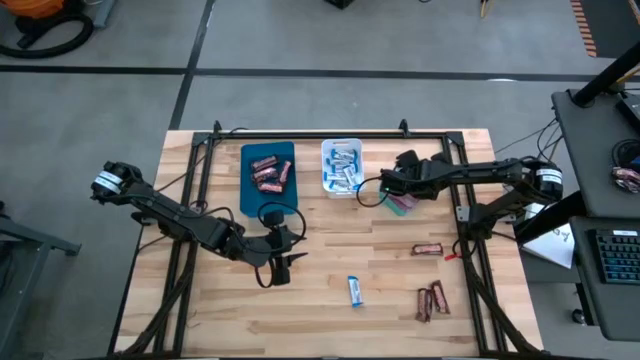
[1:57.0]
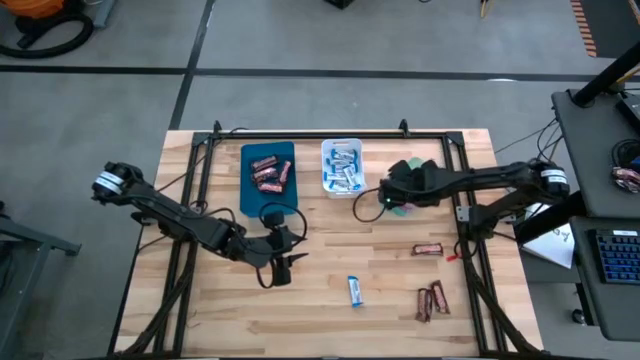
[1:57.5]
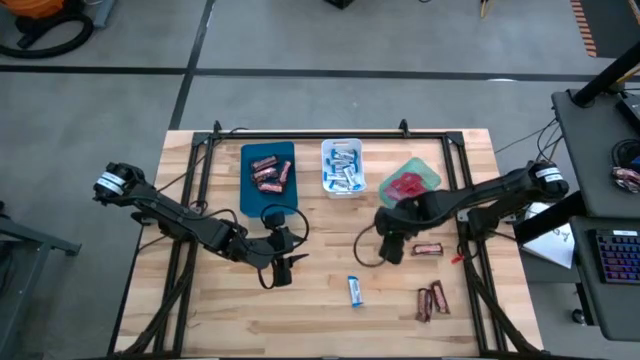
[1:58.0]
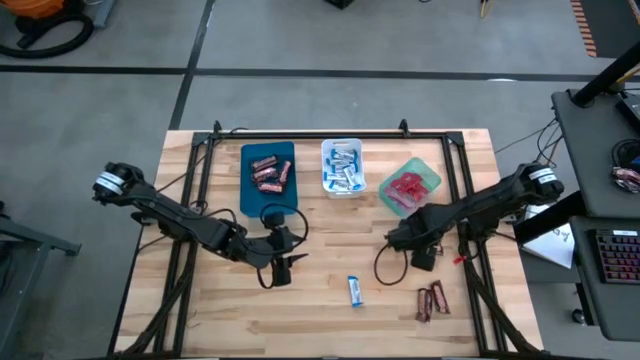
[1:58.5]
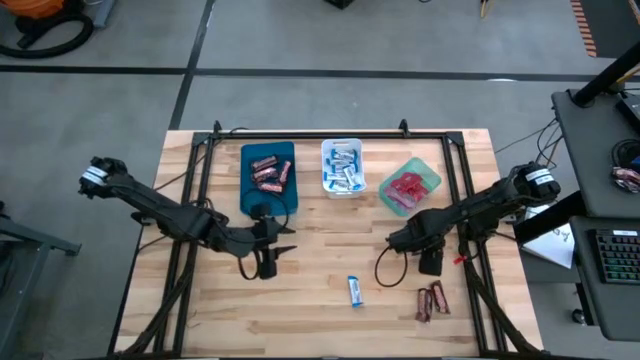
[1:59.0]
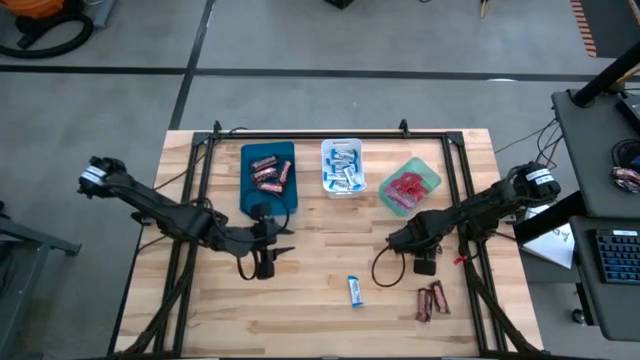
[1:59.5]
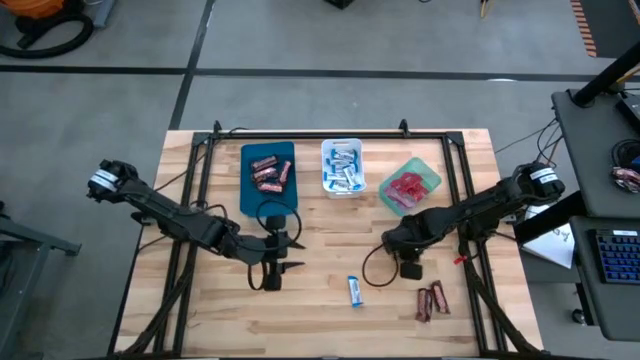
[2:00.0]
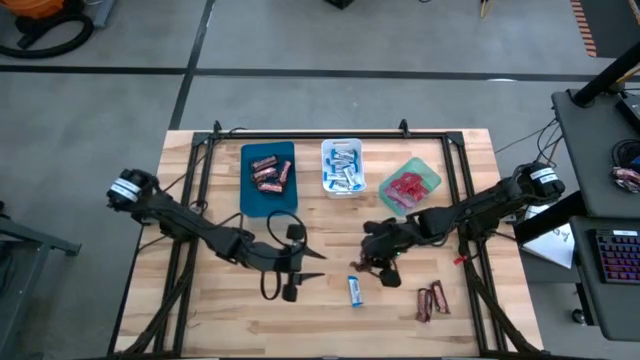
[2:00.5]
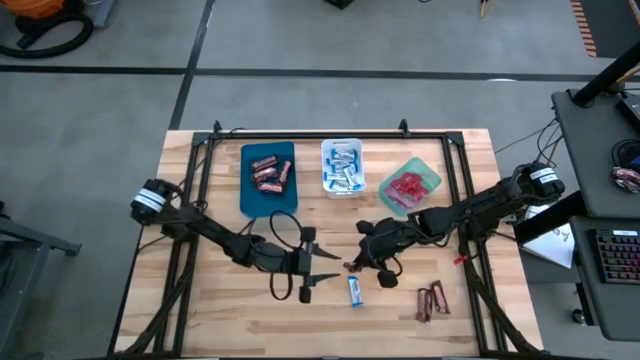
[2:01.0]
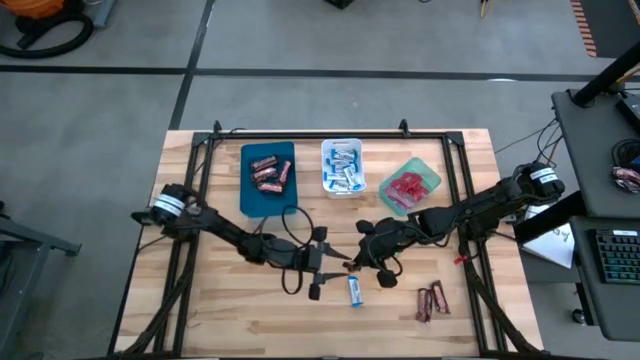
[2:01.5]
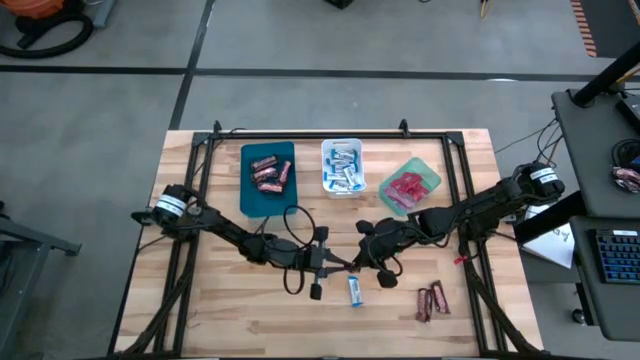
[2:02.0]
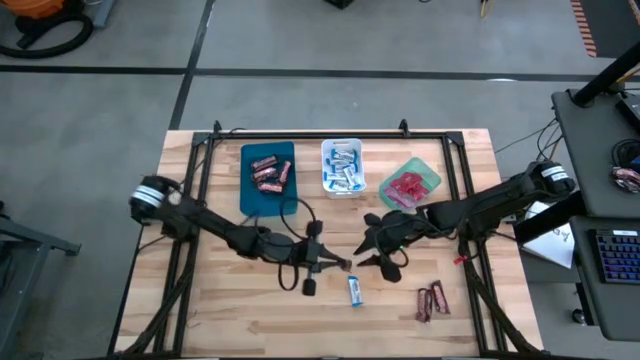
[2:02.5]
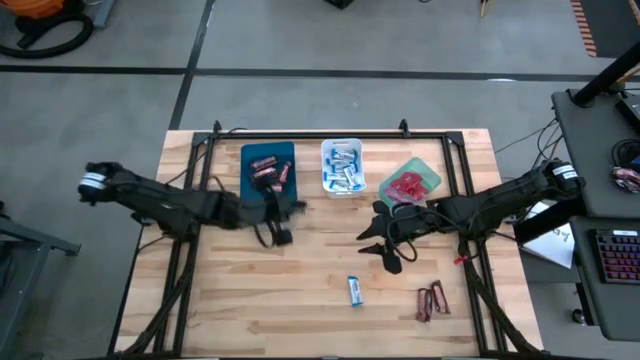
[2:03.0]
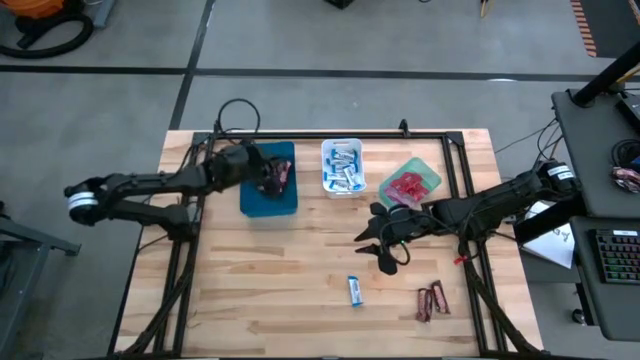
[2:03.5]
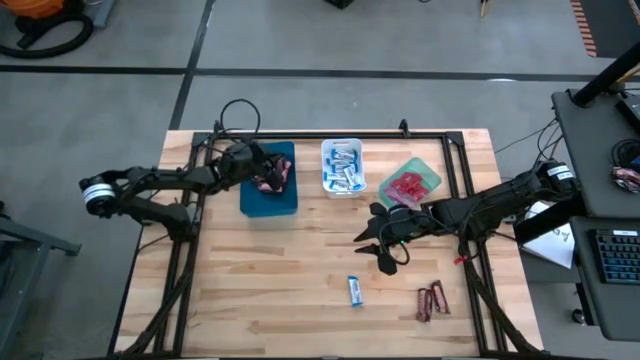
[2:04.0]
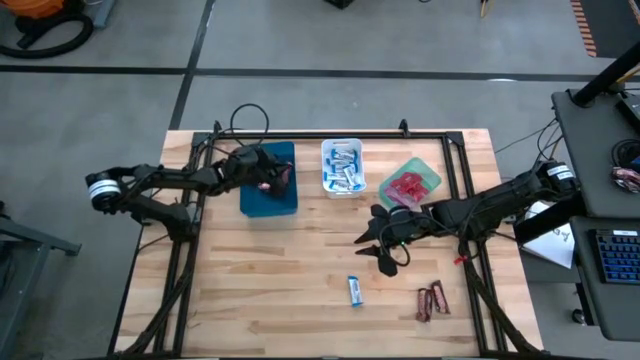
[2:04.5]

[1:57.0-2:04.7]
Task: Sort candy
Put the brown chocolate into the blue bin

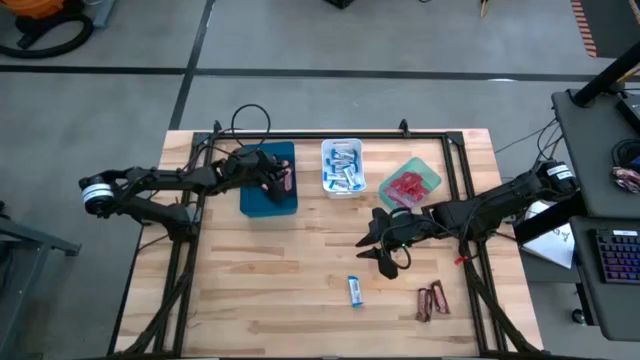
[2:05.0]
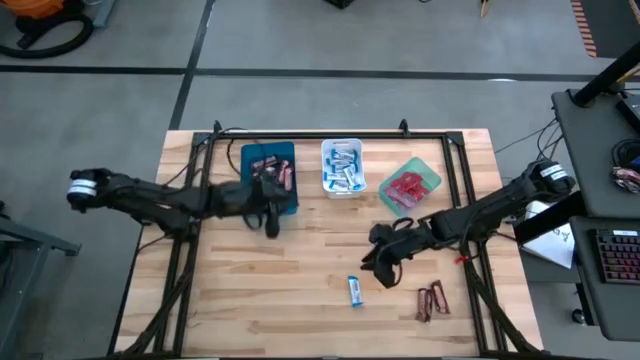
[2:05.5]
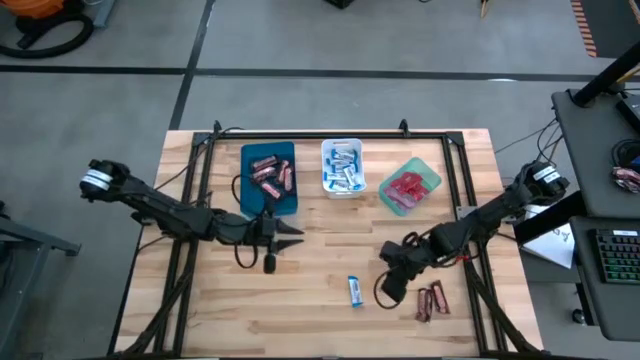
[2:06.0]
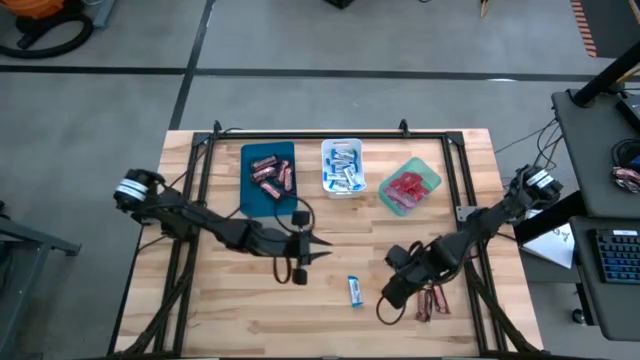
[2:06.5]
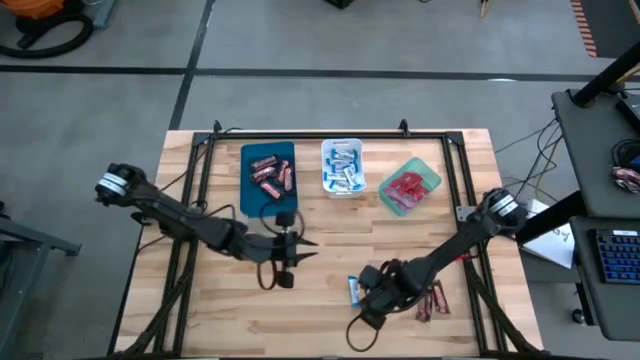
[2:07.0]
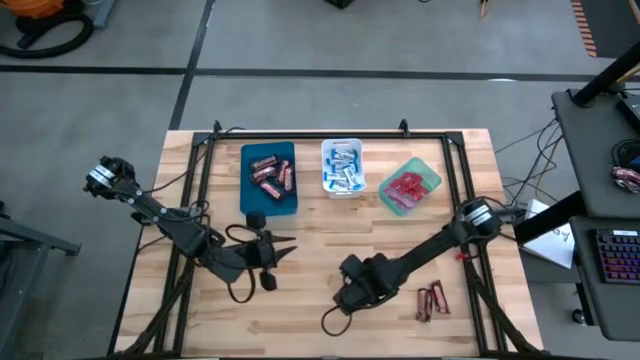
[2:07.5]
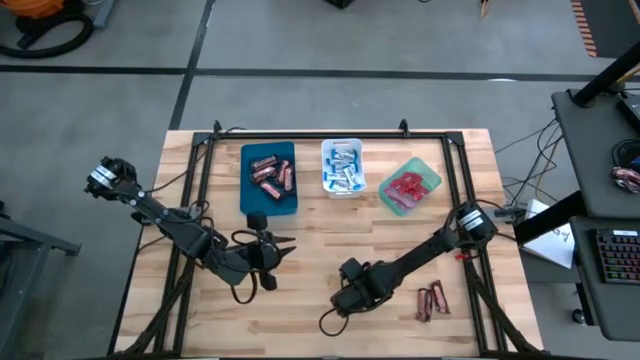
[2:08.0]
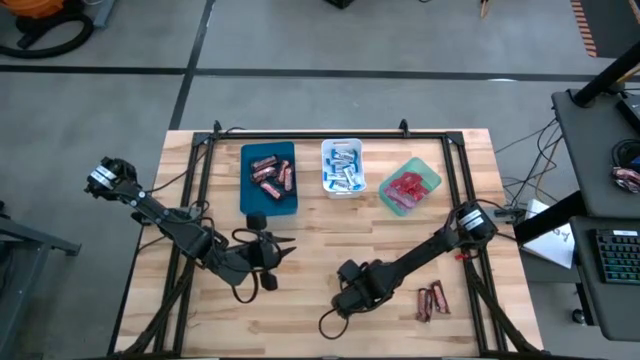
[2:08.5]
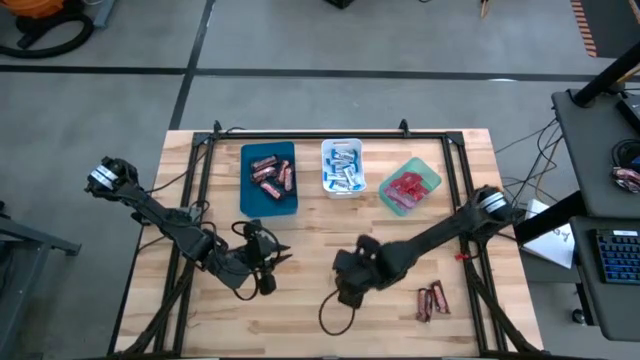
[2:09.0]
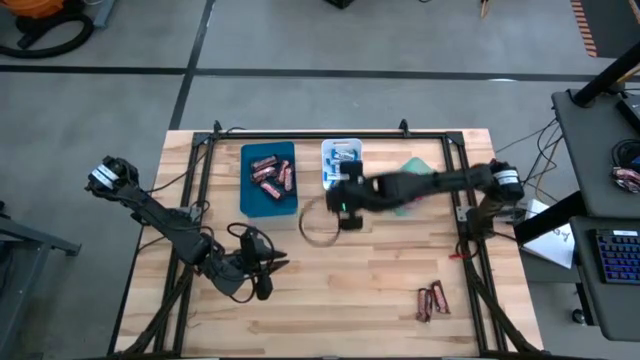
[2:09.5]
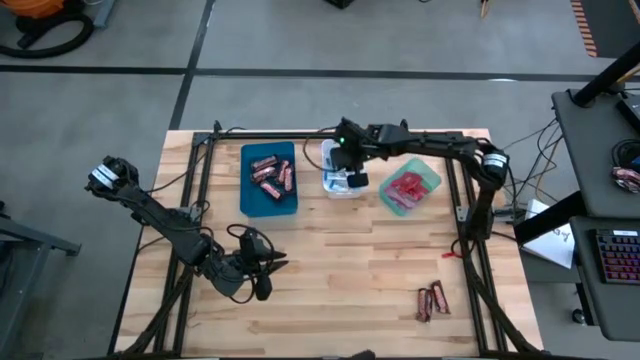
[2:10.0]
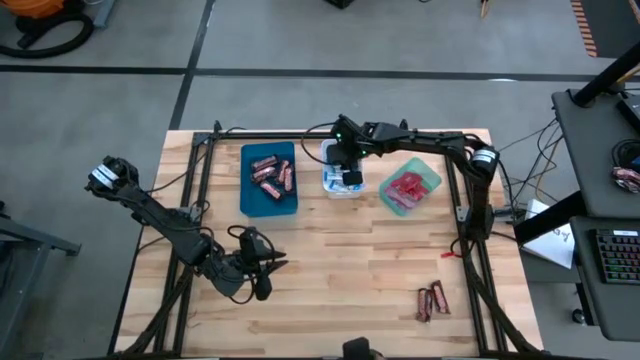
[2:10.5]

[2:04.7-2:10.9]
Put the brown chocolate into the blue bin

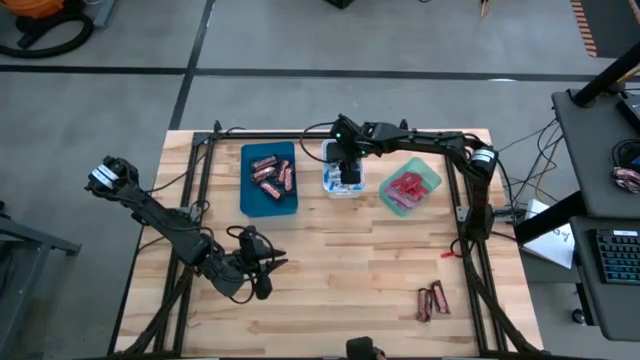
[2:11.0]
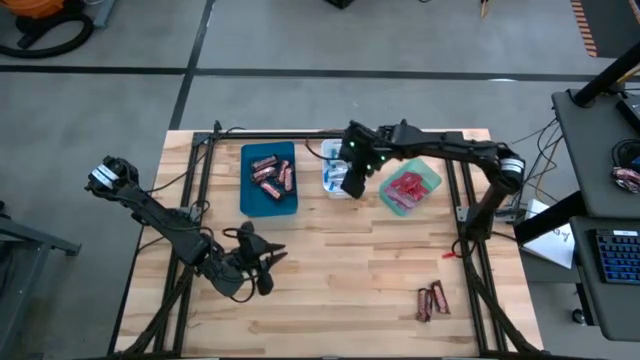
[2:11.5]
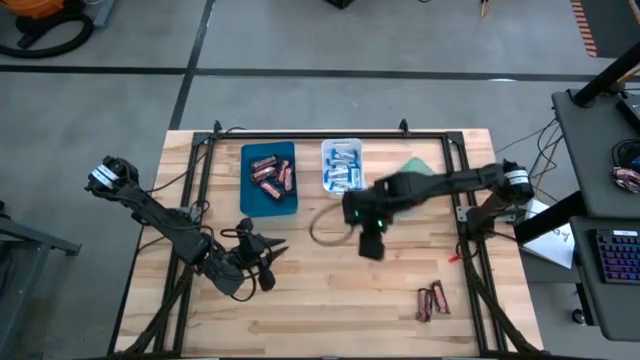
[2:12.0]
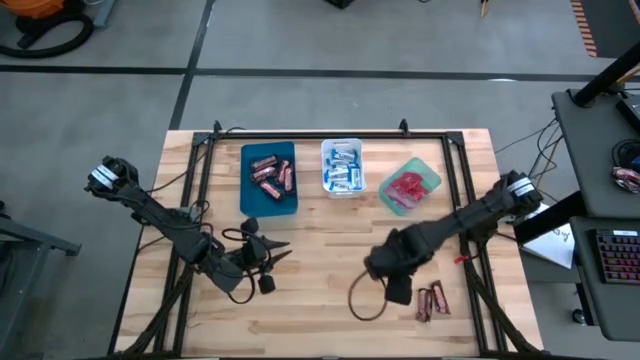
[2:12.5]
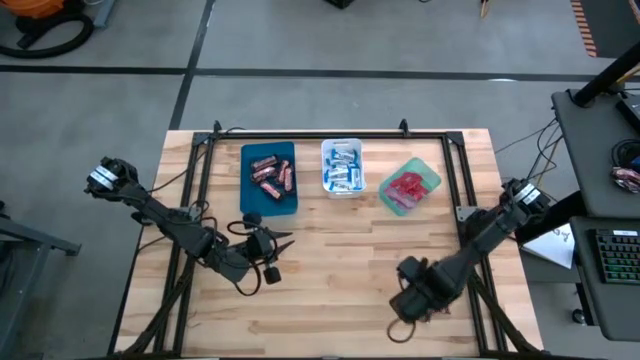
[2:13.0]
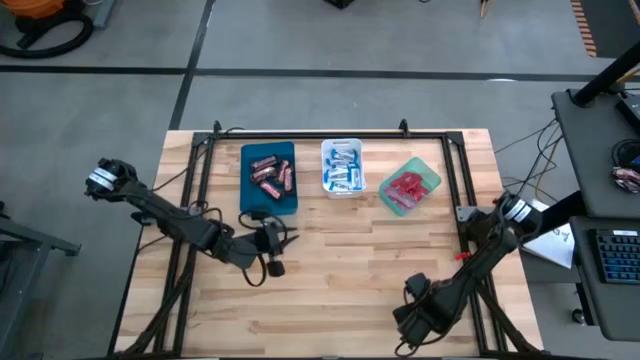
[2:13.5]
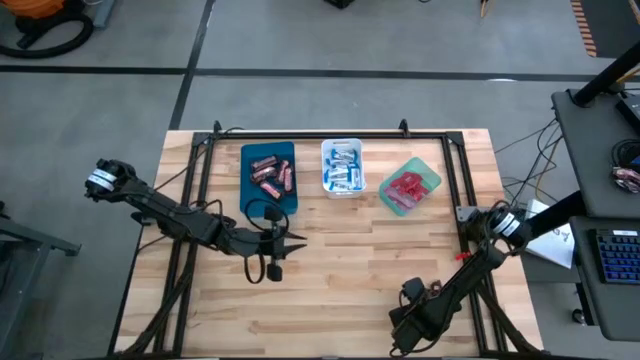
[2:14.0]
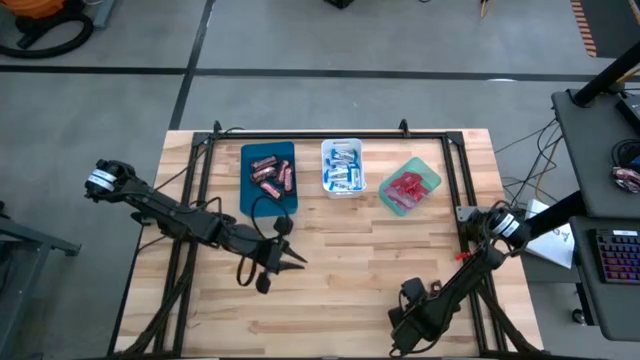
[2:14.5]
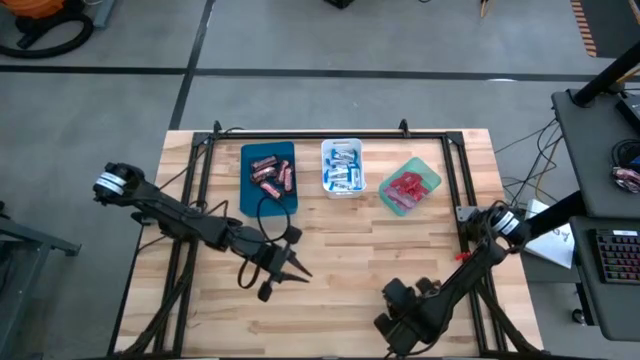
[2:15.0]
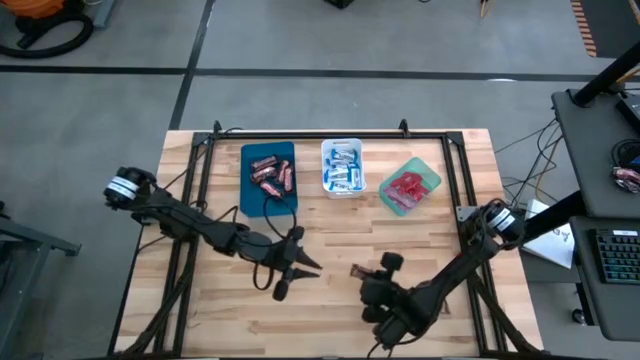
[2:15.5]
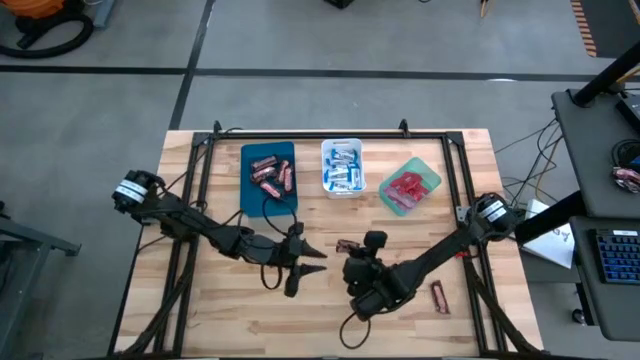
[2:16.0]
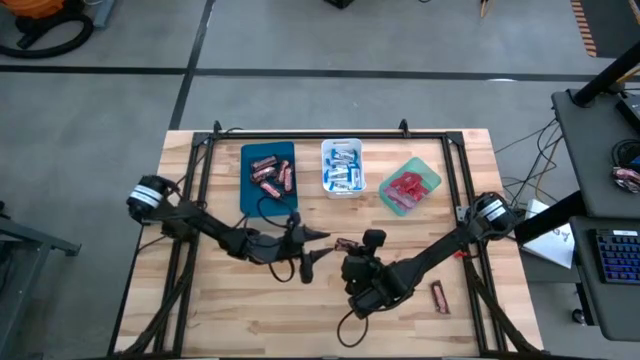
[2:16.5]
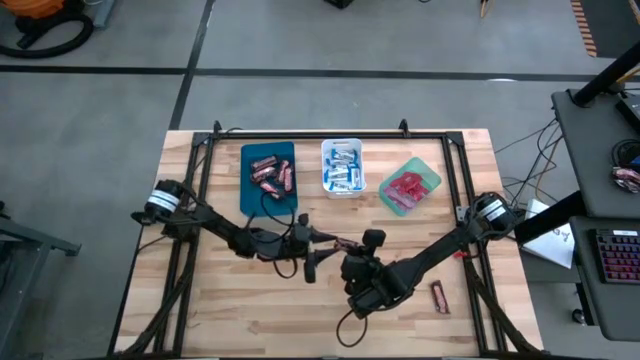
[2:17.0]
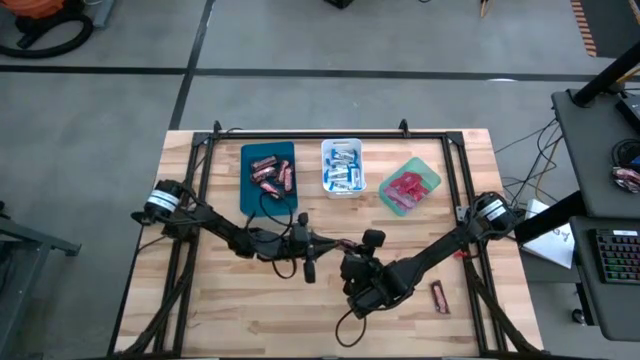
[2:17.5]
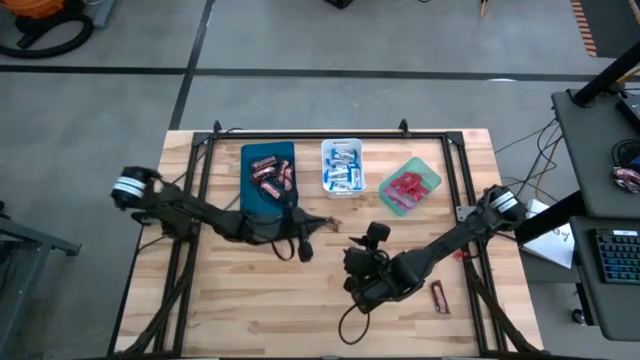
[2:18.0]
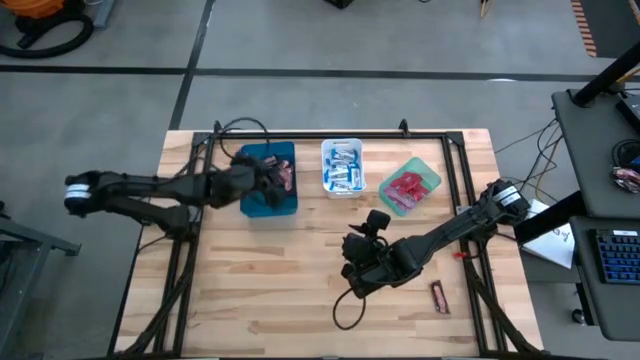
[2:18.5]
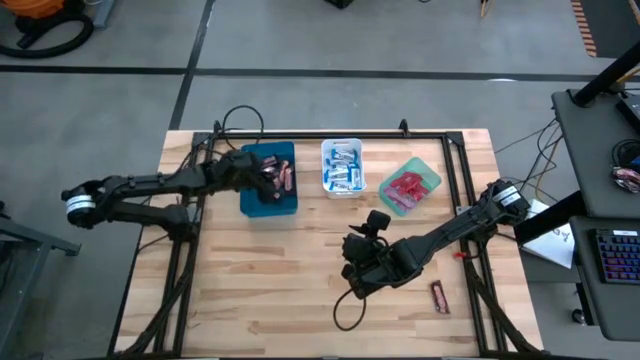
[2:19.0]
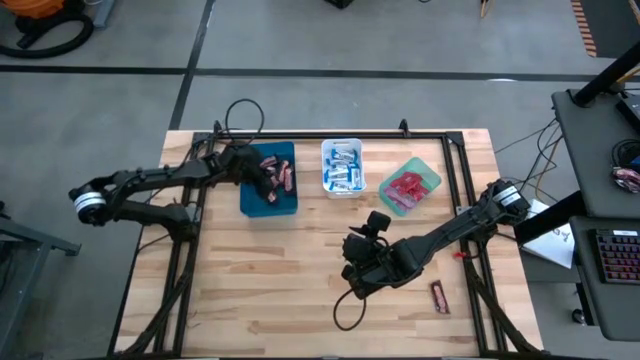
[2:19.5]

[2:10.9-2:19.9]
Put the brown chocolate into the blue bin
